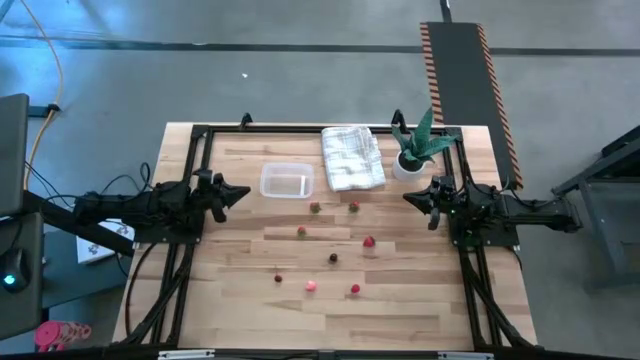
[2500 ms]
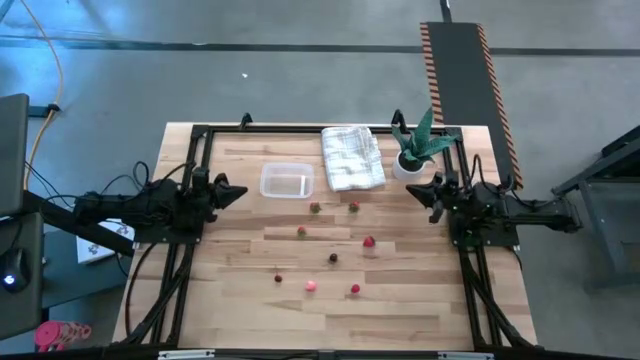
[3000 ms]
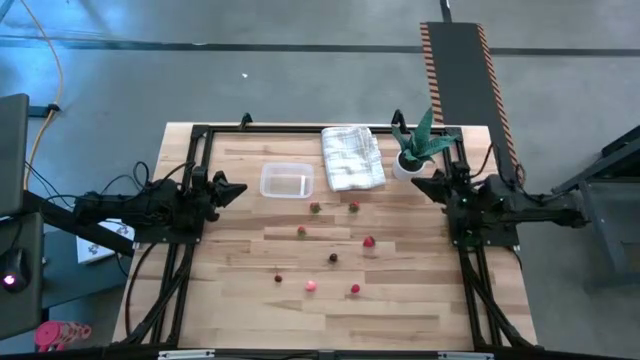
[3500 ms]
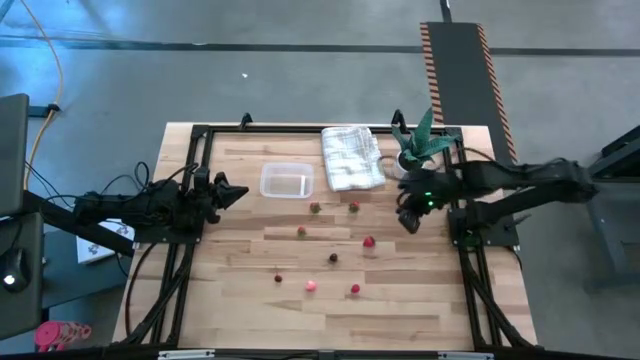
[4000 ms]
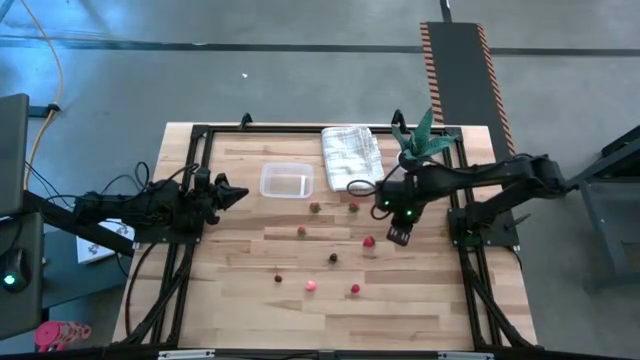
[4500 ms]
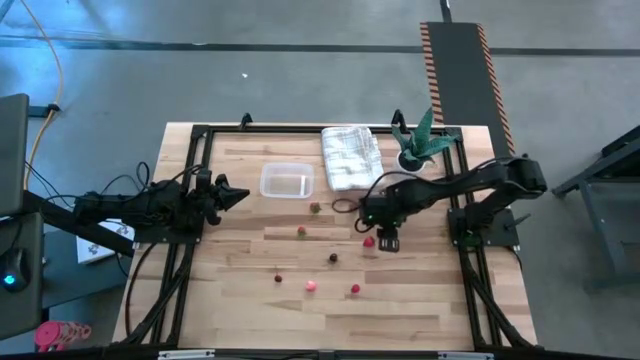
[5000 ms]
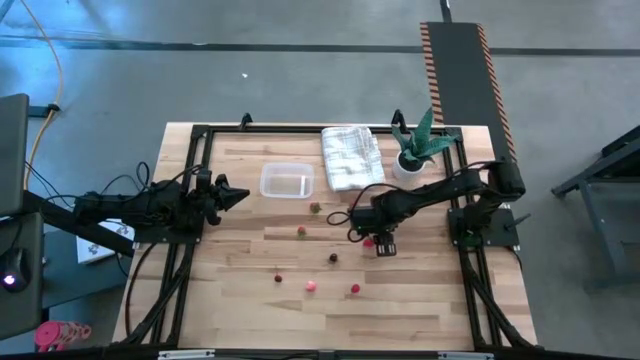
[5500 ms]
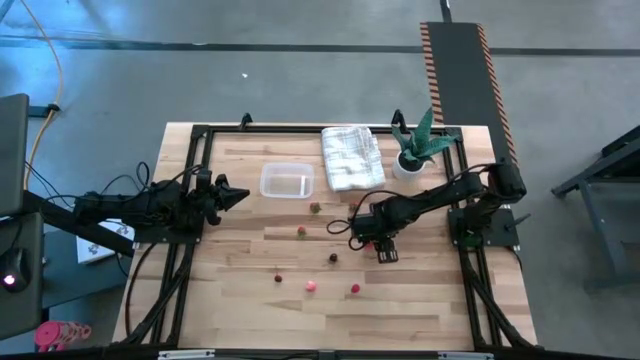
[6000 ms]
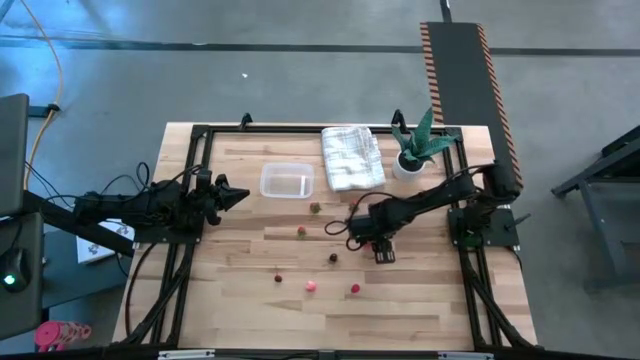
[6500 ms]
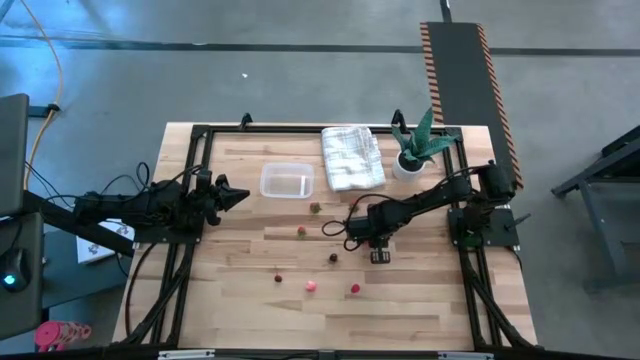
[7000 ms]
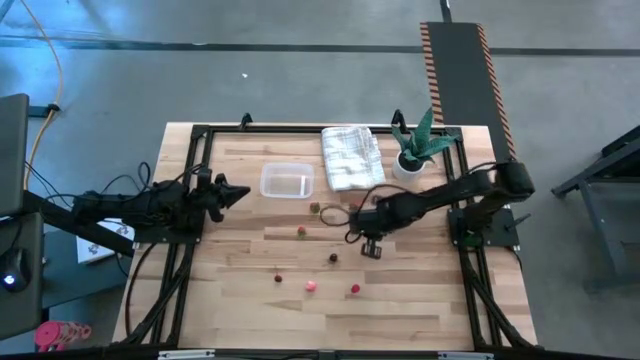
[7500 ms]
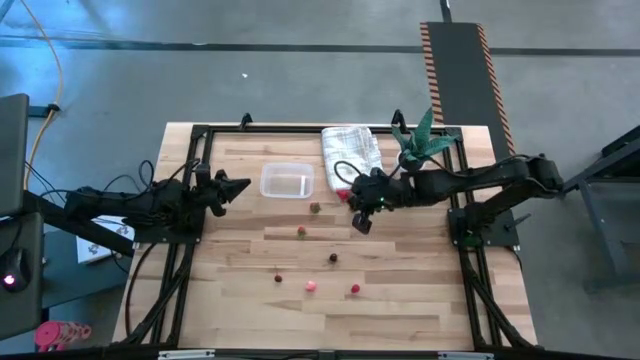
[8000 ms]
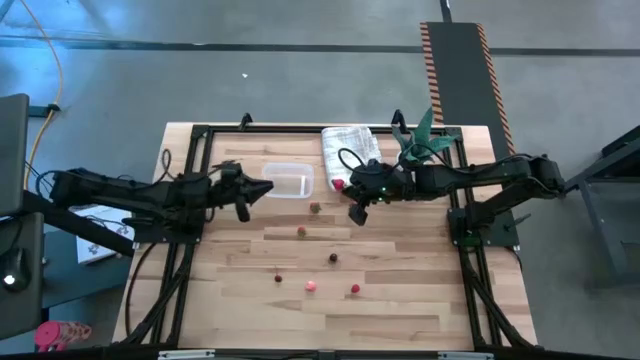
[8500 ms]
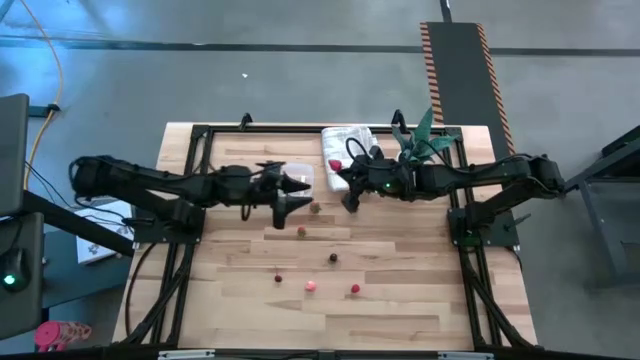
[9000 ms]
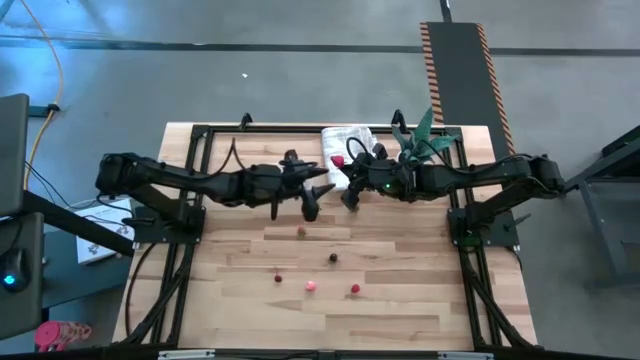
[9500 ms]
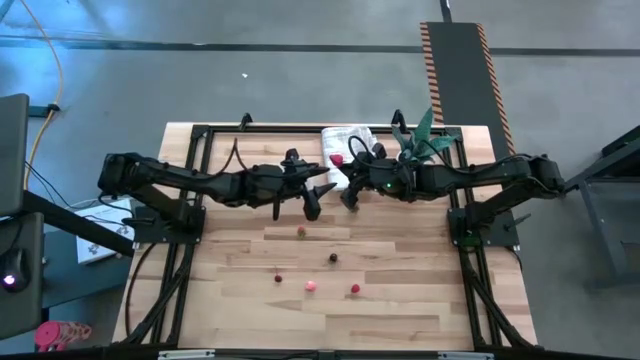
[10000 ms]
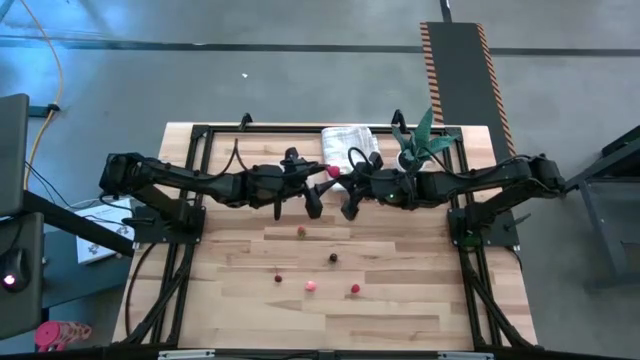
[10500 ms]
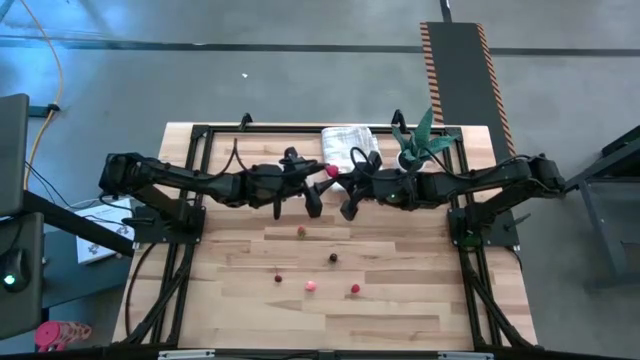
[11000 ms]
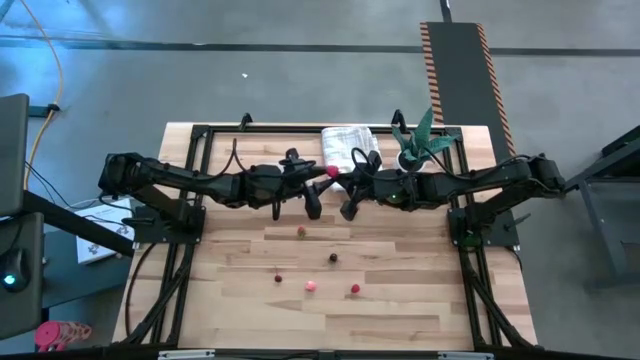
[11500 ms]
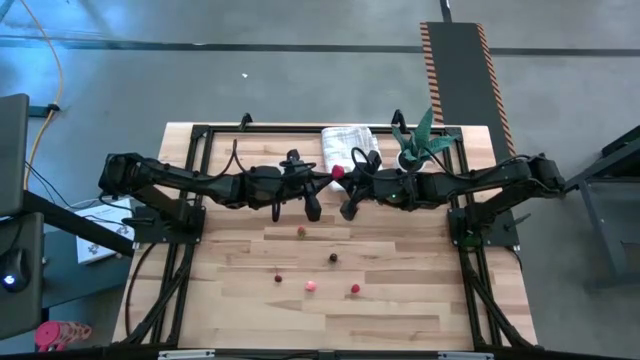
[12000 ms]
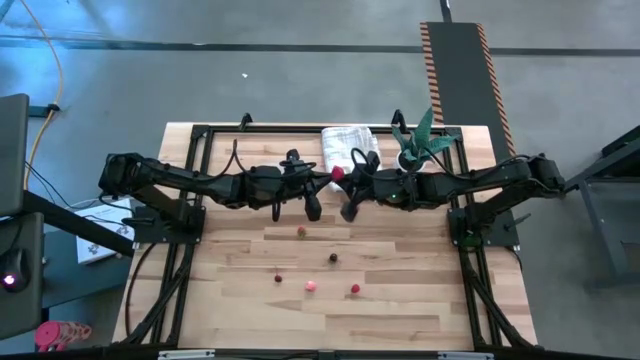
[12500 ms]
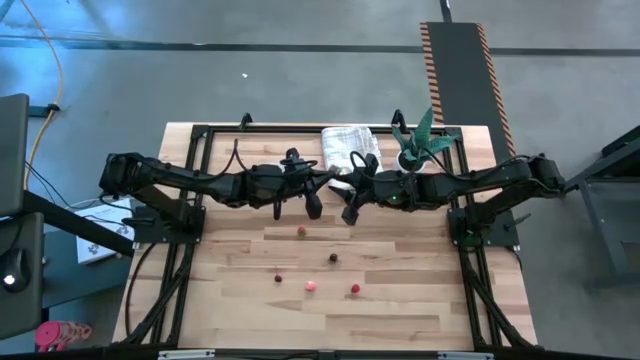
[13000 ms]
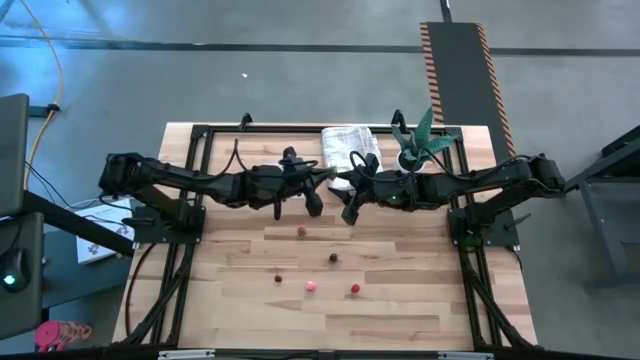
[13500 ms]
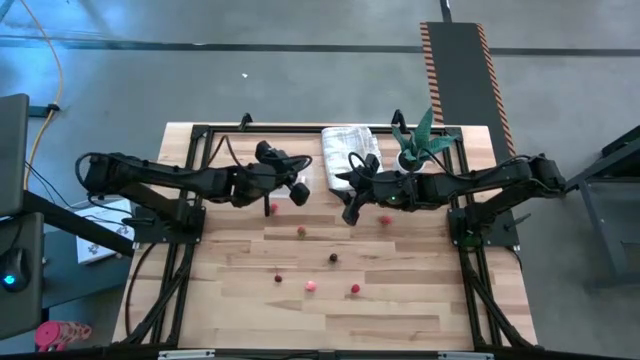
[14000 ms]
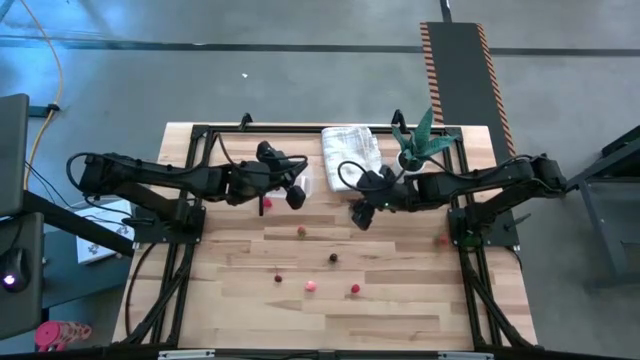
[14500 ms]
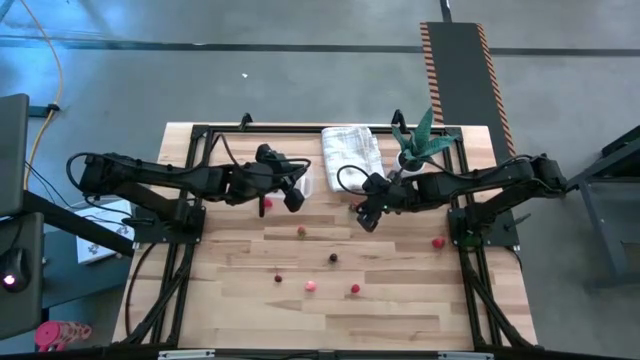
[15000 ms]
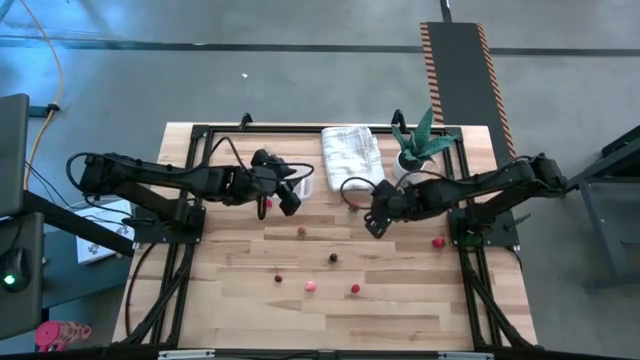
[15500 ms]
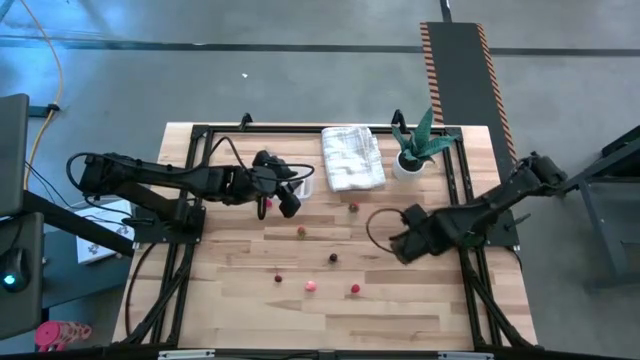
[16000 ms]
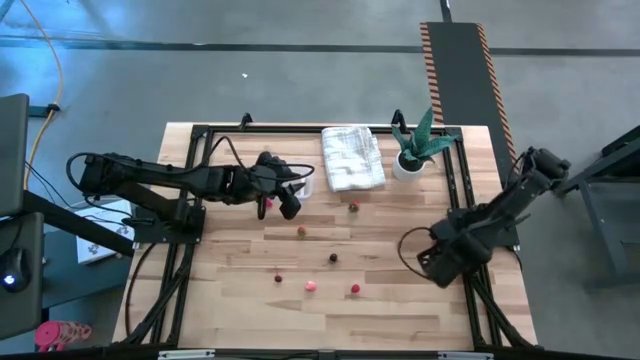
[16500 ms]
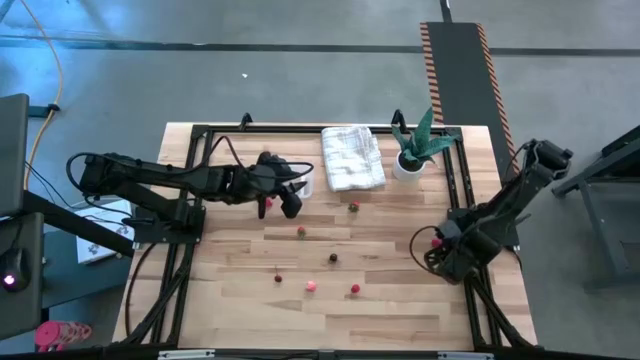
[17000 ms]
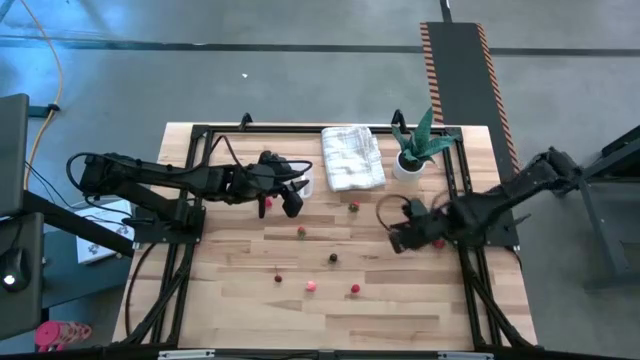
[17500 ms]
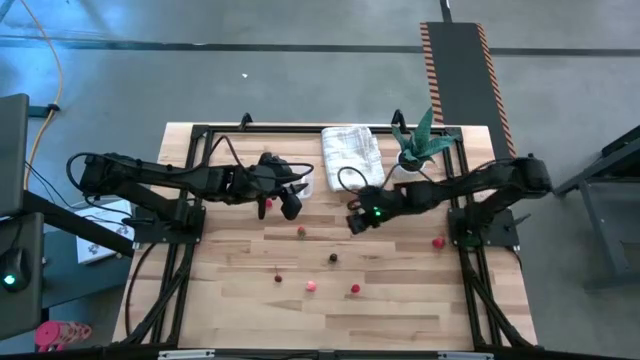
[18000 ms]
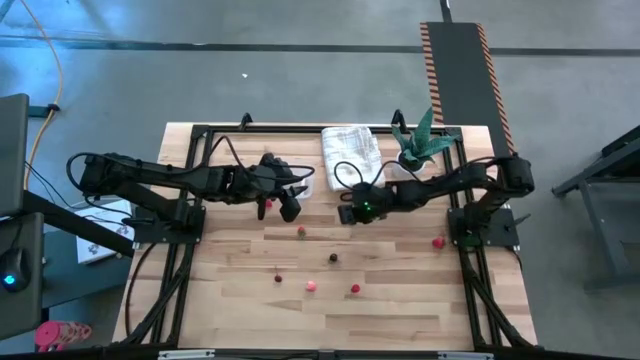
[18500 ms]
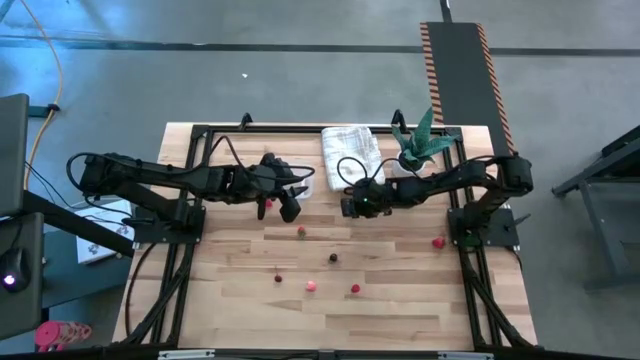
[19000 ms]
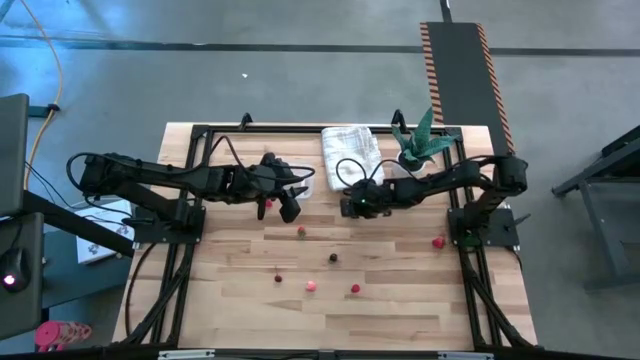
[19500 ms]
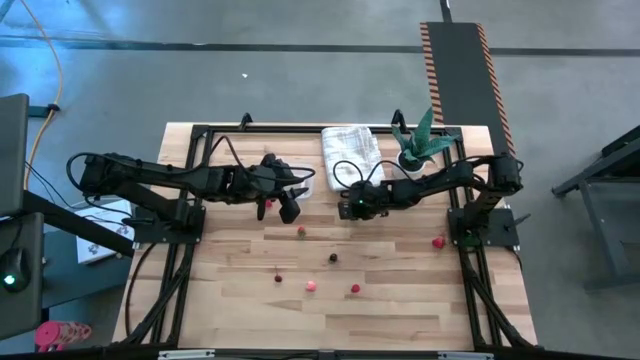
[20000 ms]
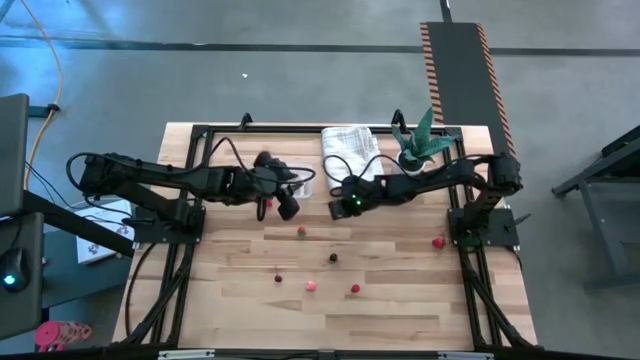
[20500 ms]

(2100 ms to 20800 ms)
Task: Pick and placing Produce into tupperware
Put the red strawberry into the transparent bin

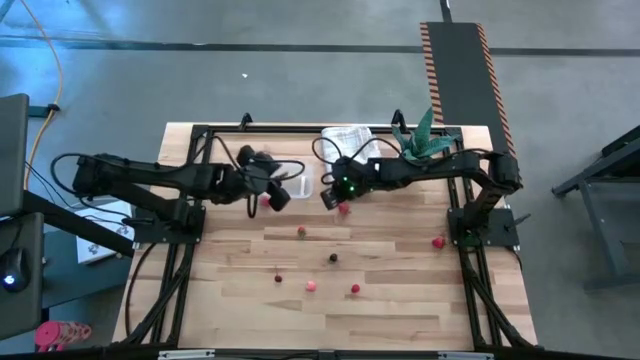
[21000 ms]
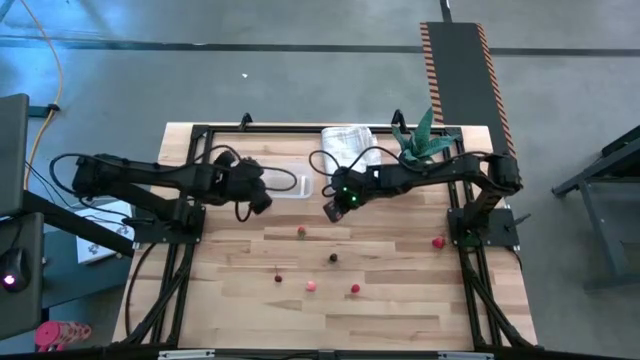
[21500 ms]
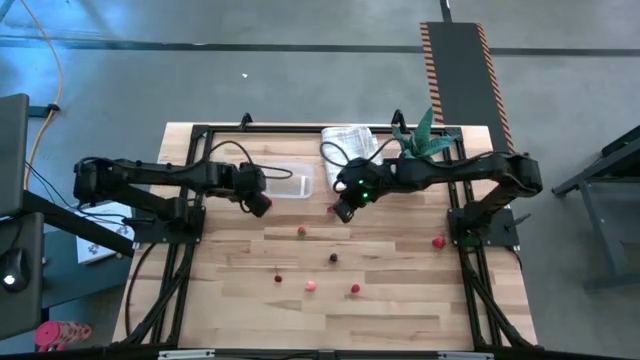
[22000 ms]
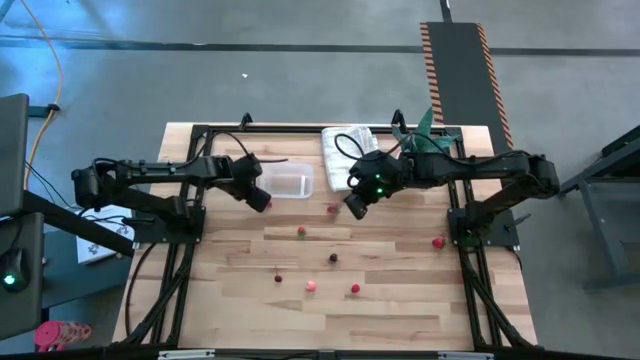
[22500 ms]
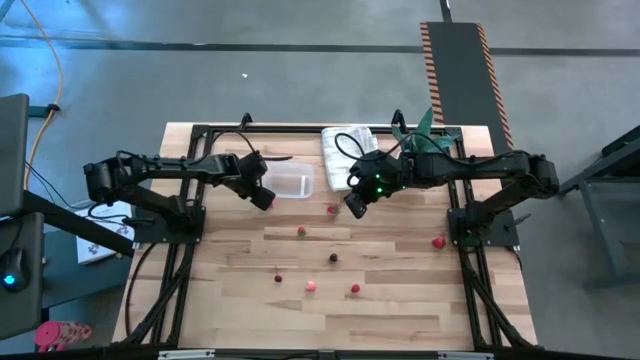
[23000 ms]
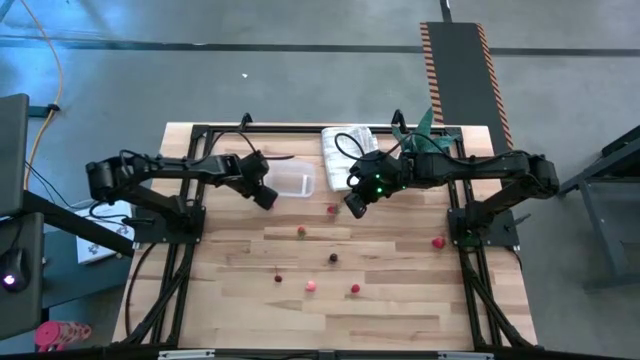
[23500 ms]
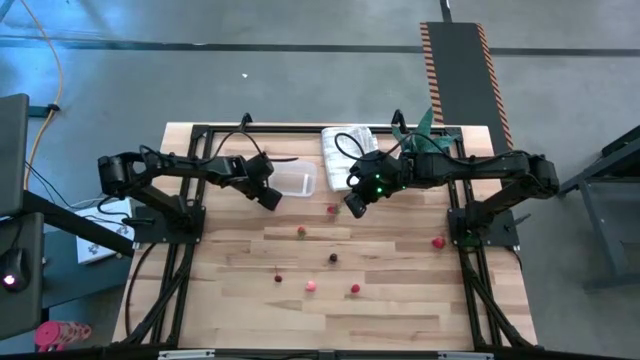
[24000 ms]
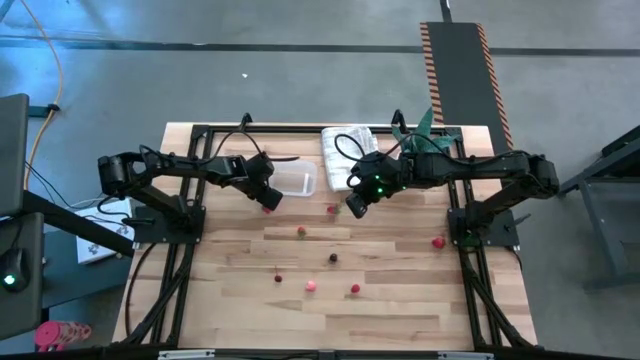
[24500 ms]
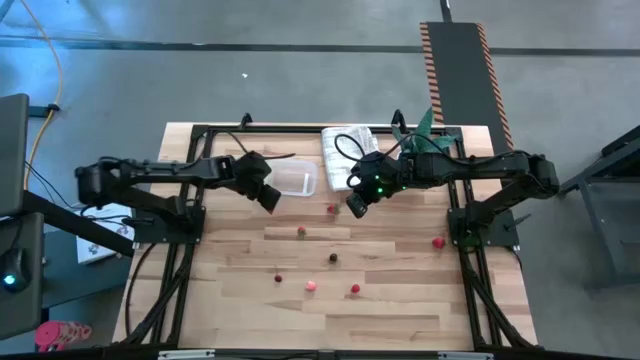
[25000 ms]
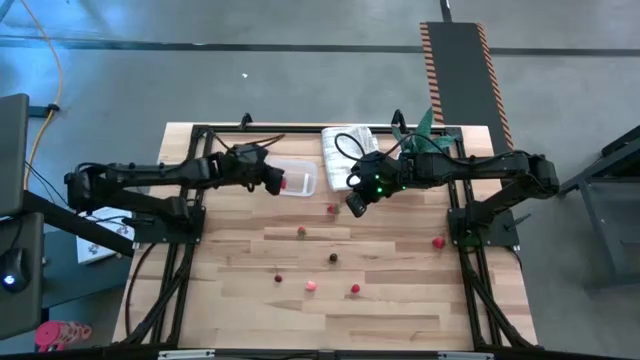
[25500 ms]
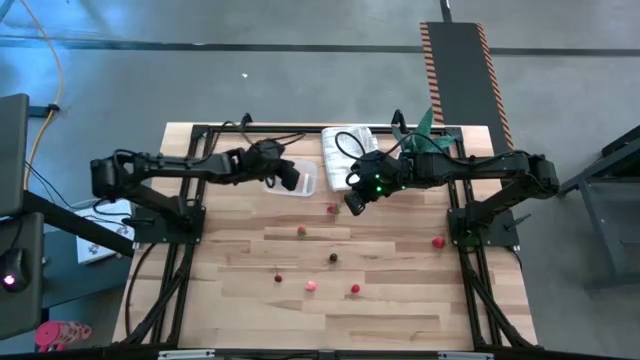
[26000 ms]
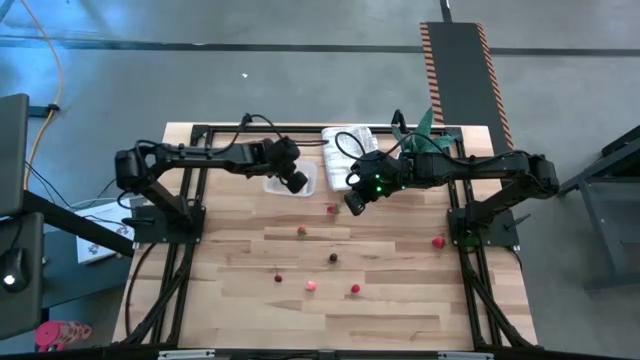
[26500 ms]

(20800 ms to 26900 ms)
Put the red strawberry into the transparent bin
